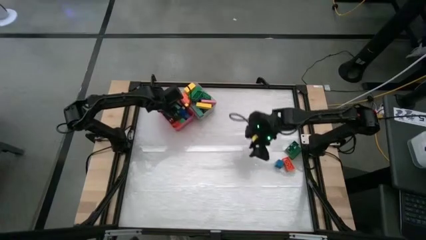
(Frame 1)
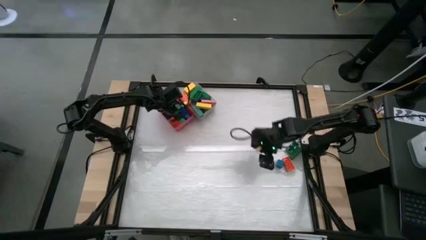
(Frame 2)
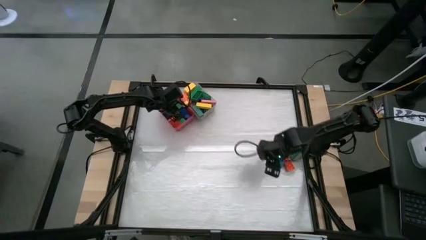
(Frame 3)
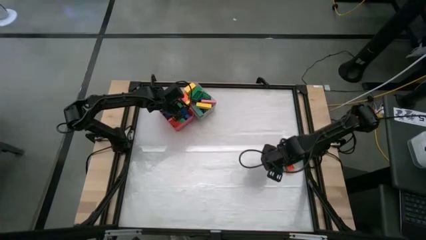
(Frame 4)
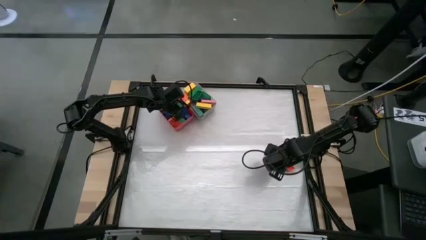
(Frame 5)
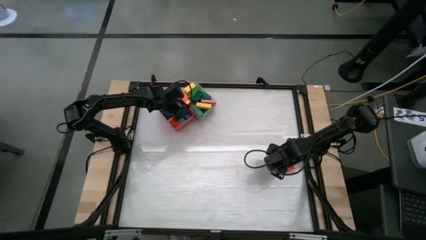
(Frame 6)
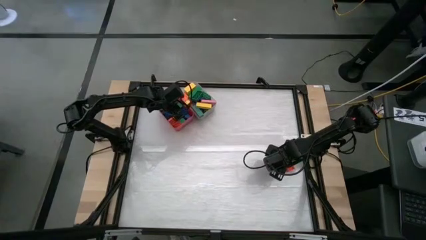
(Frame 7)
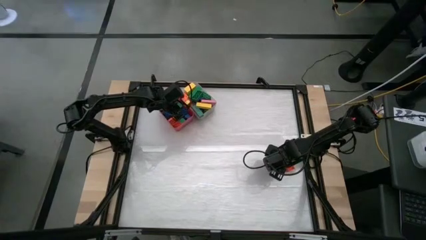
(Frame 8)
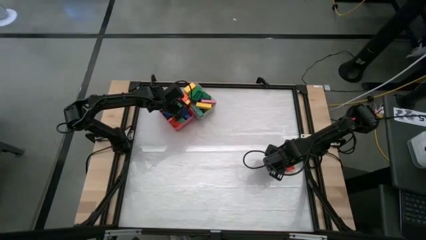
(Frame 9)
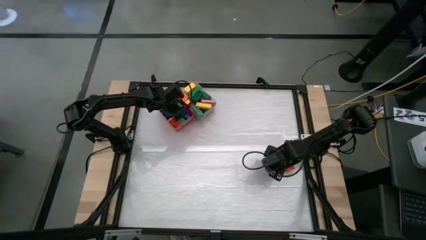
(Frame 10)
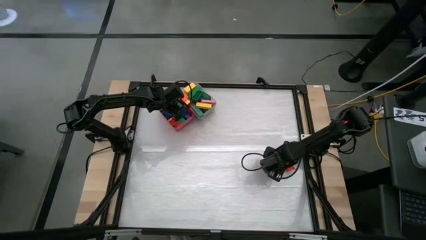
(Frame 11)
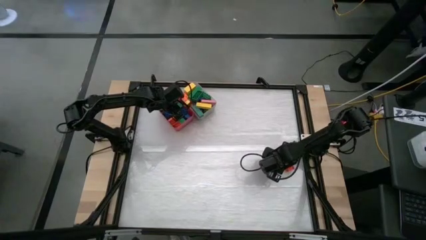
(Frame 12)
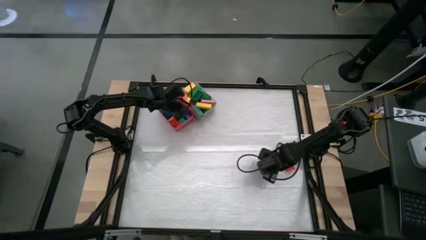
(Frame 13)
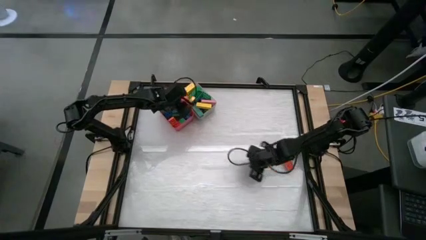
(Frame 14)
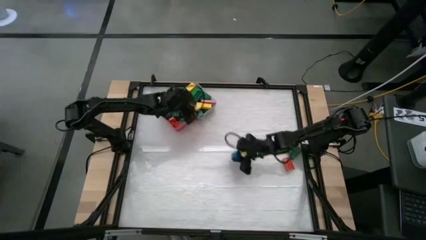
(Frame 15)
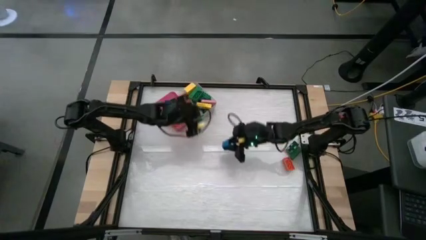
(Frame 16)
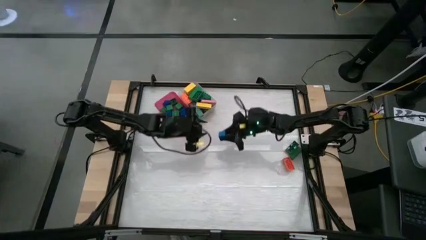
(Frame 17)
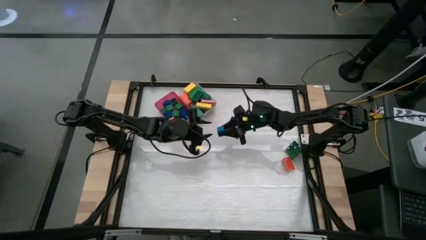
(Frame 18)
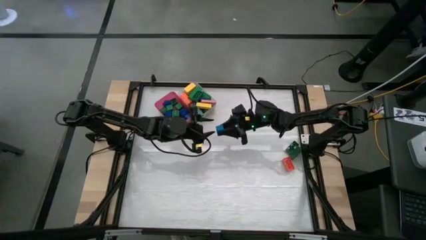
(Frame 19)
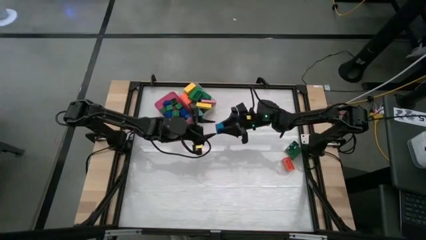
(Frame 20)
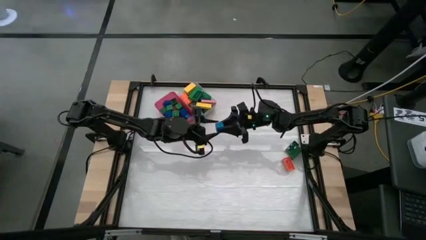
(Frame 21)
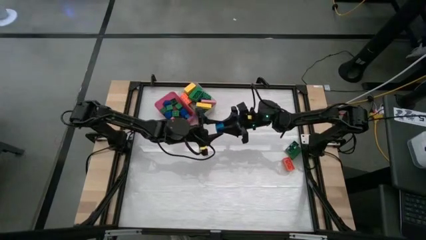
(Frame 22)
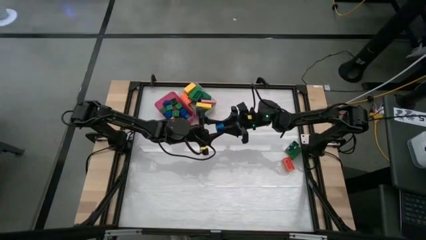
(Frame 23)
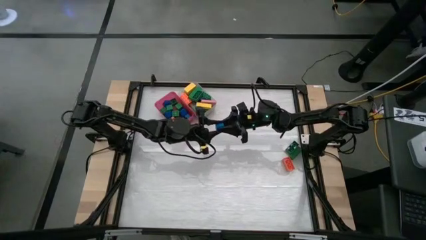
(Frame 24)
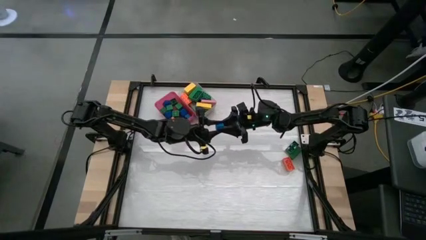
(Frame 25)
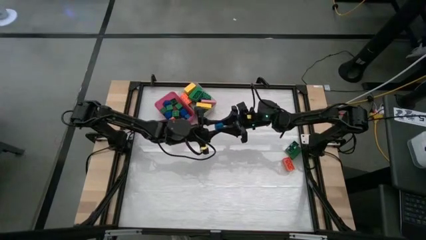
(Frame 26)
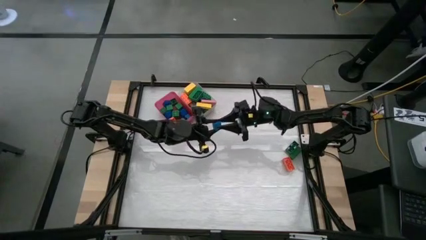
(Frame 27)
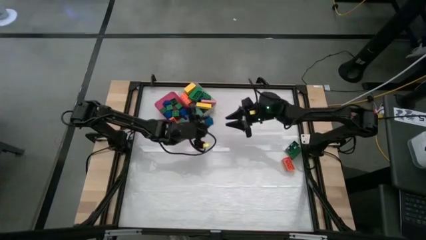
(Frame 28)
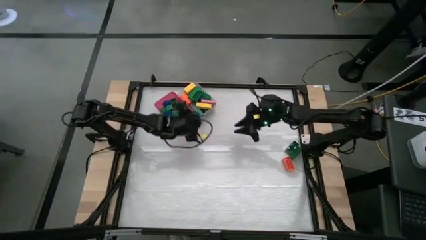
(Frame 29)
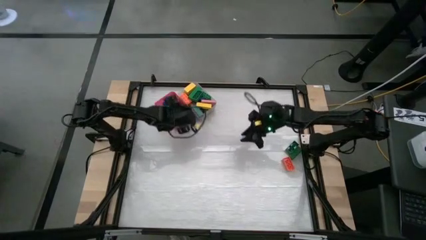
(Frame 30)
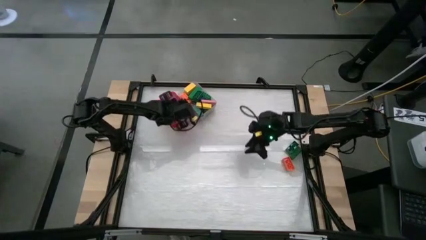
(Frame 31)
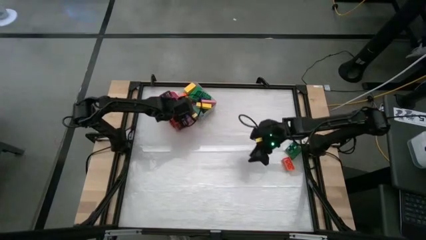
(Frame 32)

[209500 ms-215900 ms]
Task: Sort blocks by size
Put the small blue block into the pink bin

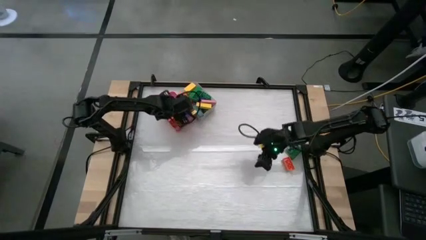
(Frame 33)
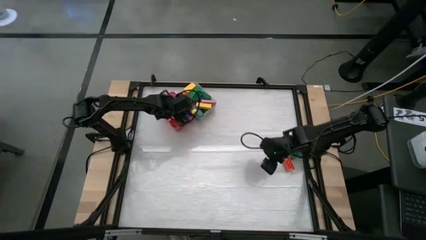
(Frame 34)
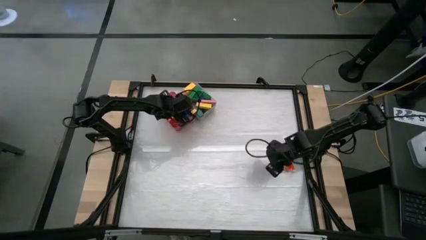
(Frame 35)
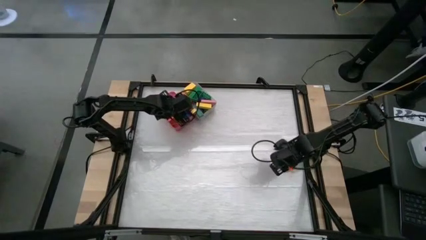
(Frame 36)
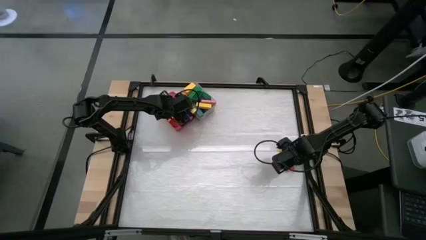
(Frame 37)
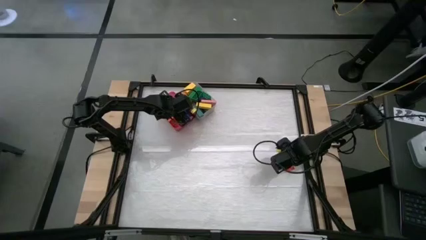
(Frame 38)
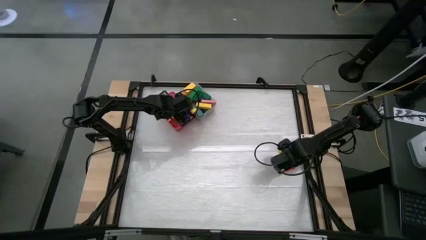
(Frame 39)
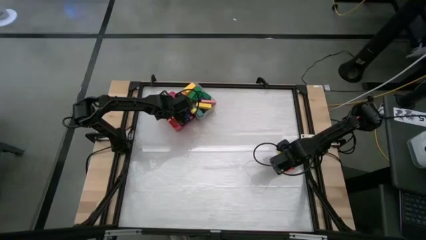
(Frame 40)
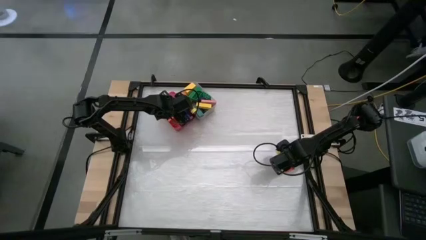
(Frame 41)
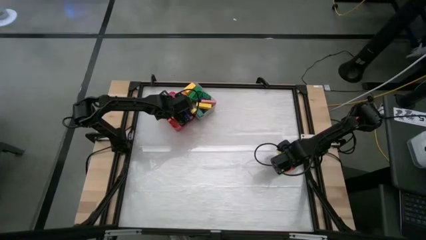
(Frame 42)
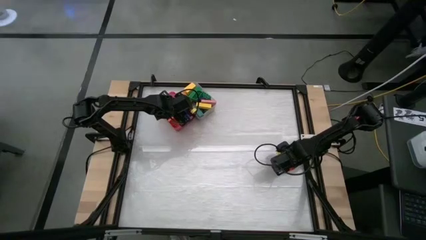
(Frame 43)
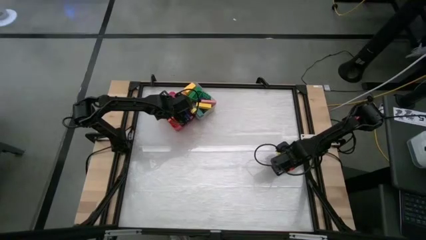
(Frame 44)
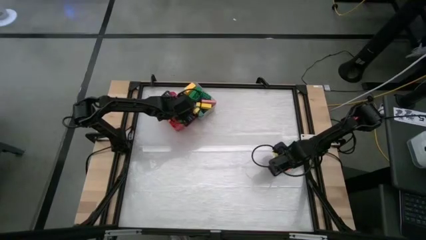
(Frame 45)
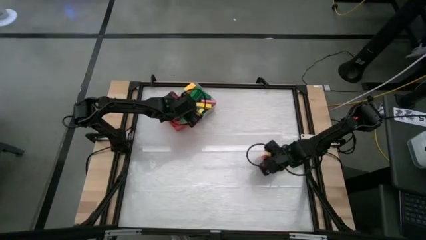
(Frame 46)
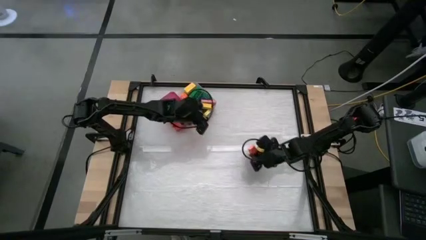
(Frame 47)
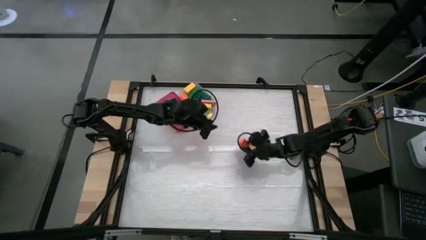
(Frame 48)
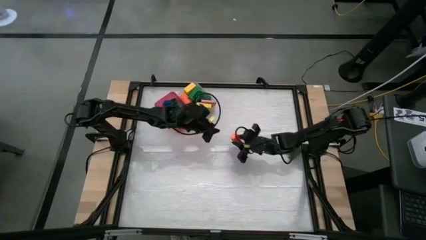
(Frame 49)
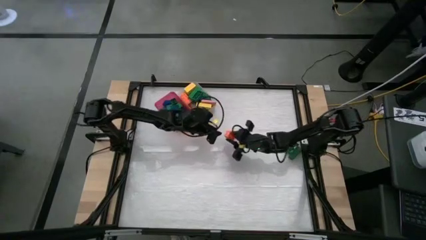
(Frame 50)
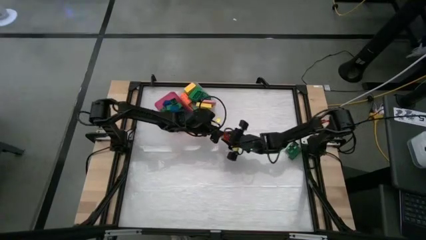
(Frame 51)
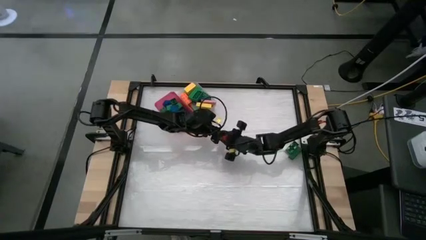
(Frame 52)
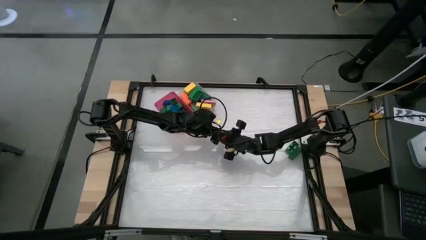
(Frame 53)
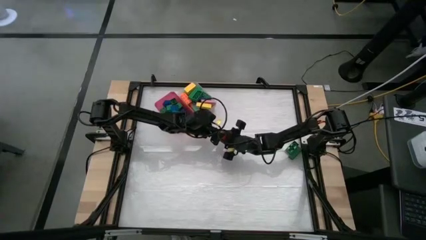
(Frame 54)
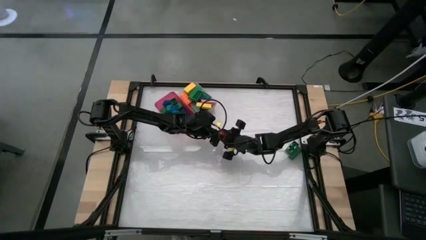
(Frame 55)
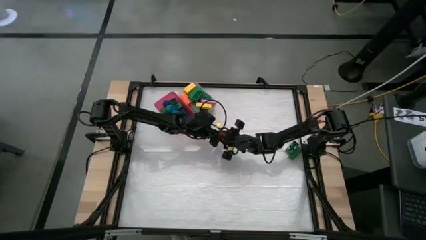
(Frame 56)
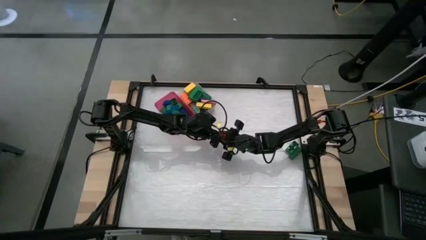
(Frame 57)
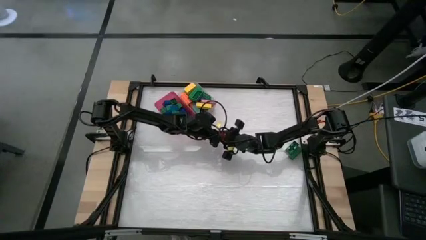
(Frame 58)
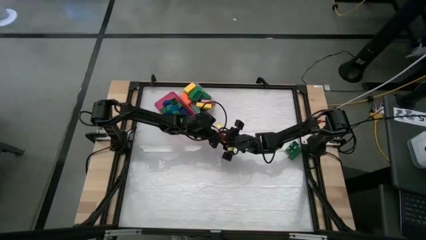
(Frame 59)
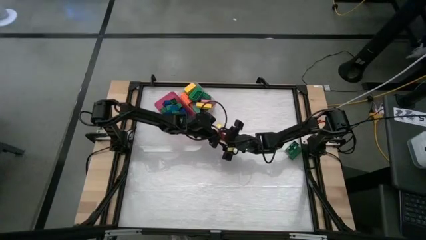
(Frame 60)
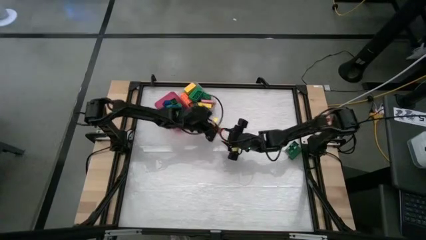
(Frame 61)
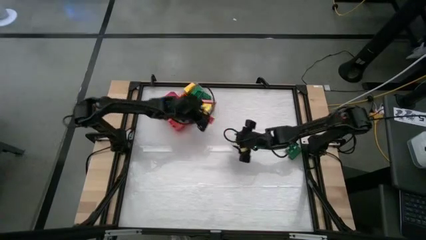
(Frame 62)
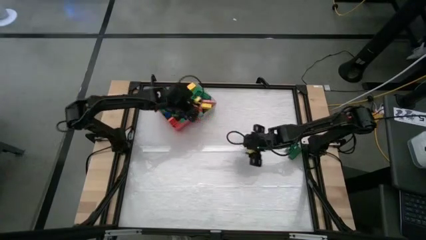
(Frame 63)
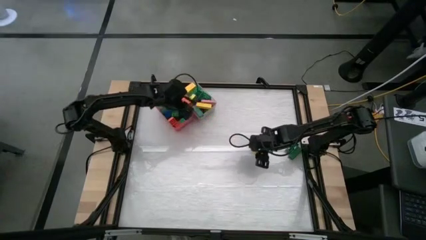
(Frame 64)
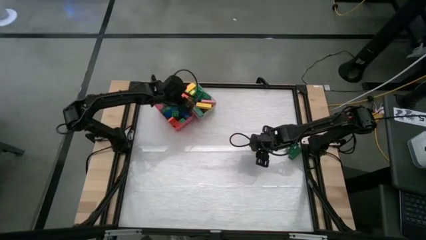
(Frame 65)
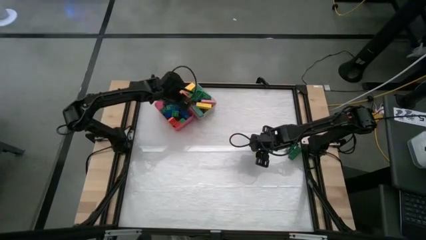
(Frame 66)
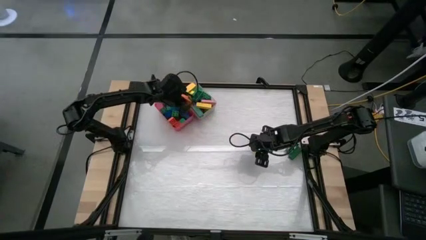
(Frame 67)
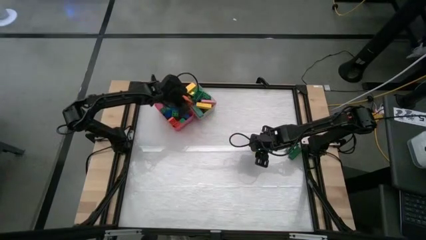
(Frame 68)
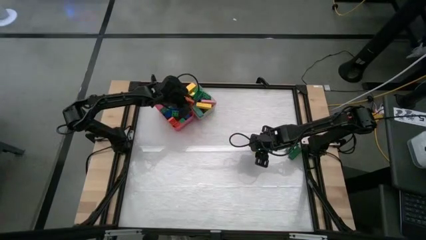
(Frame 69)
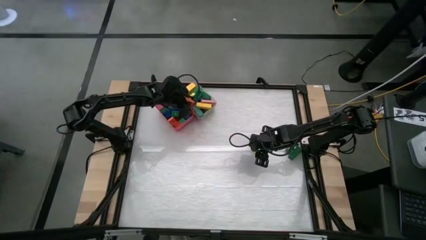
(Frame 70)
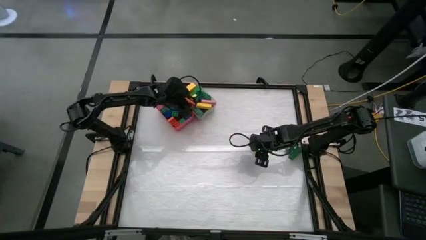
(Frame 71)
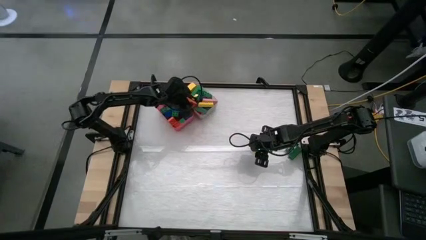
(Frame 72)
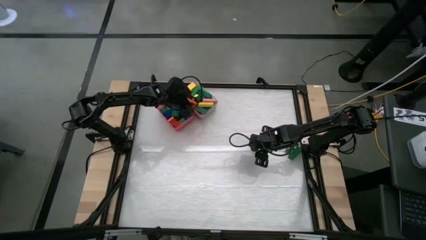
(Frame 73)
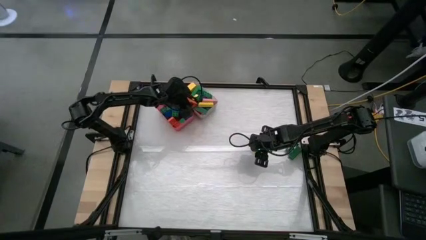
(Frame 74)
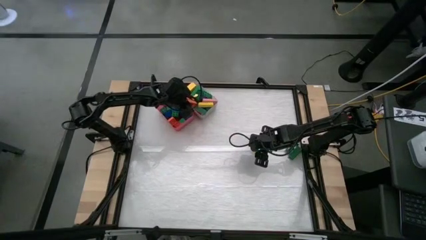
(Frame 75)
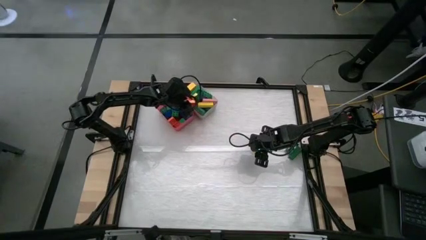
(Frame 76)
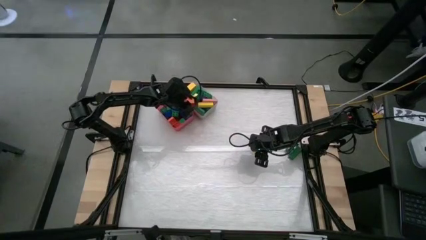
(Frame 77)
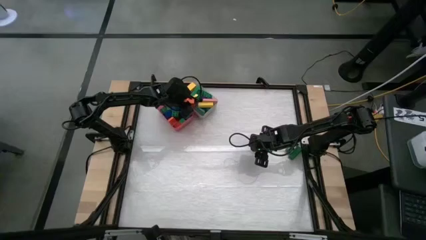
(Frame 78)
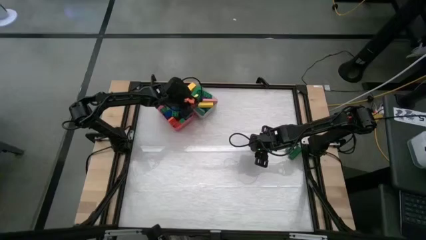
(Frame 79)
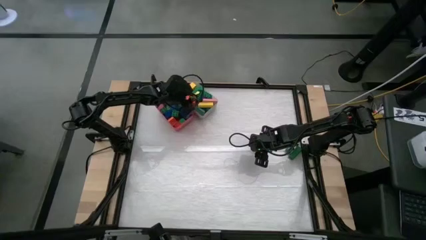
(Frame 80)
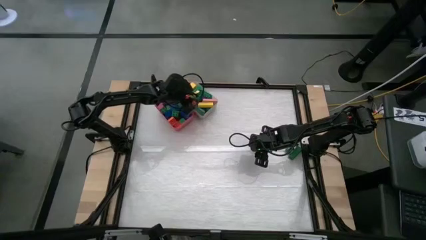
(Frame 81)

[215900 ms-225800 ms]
Put the big orange game piece into the white bin
